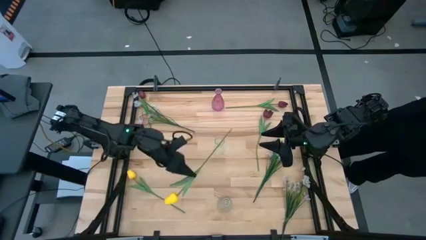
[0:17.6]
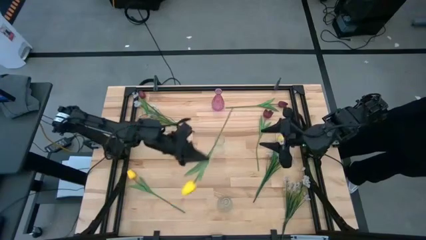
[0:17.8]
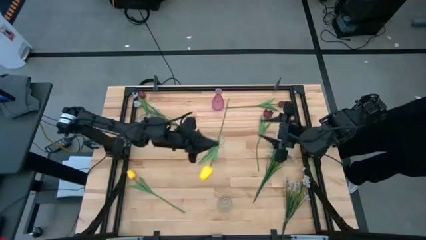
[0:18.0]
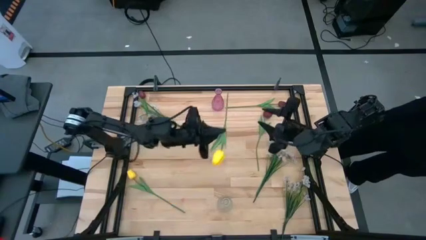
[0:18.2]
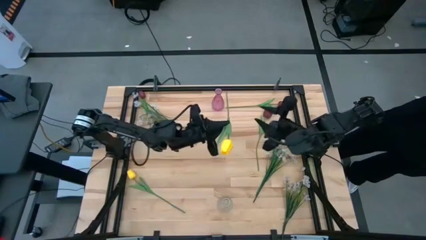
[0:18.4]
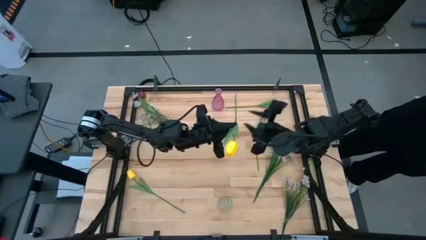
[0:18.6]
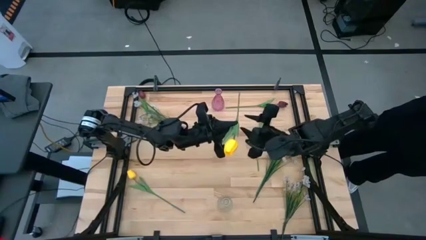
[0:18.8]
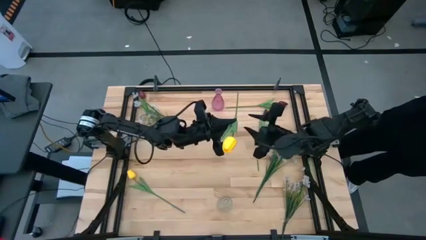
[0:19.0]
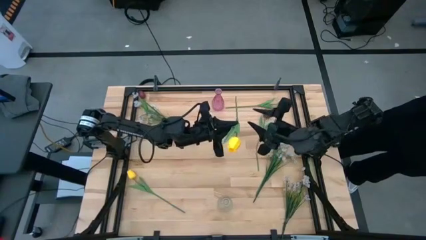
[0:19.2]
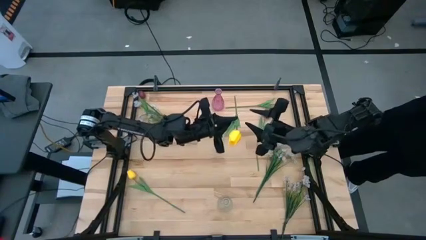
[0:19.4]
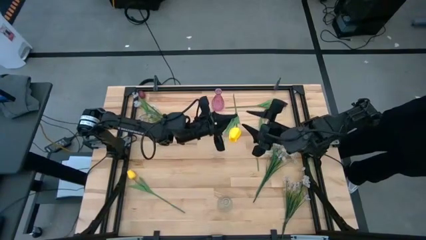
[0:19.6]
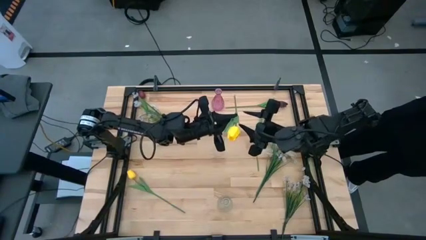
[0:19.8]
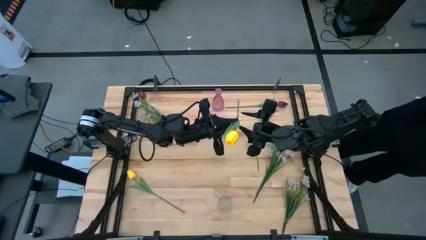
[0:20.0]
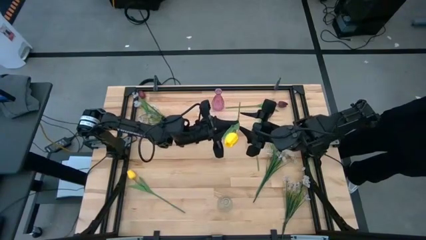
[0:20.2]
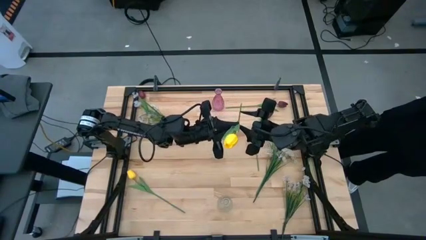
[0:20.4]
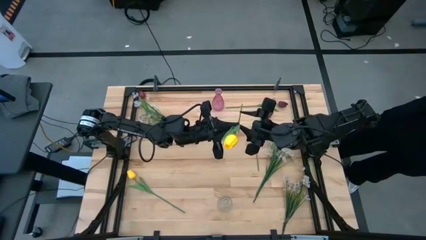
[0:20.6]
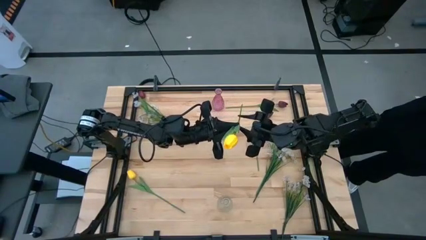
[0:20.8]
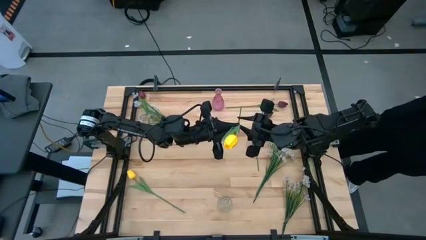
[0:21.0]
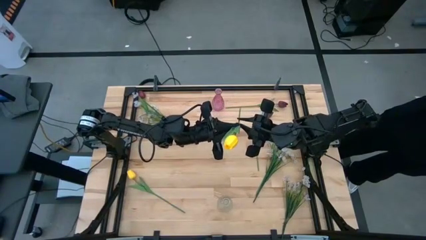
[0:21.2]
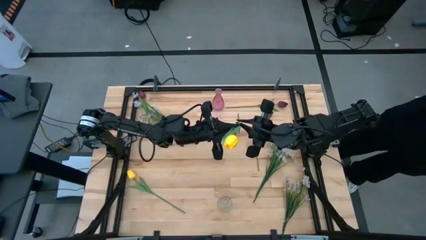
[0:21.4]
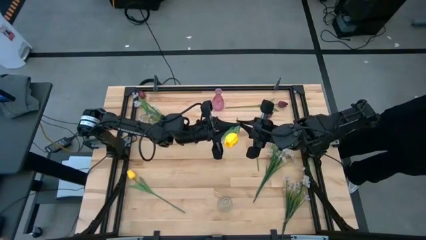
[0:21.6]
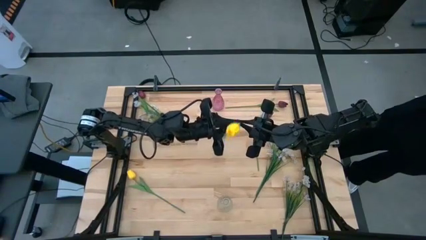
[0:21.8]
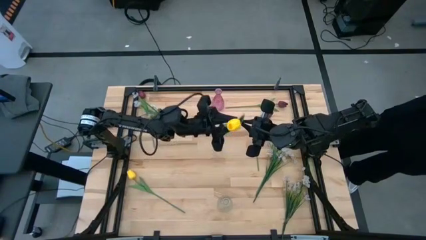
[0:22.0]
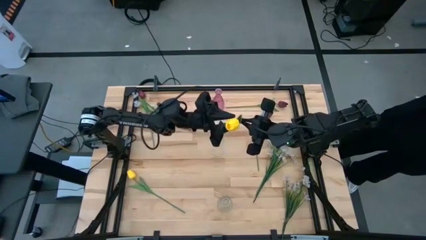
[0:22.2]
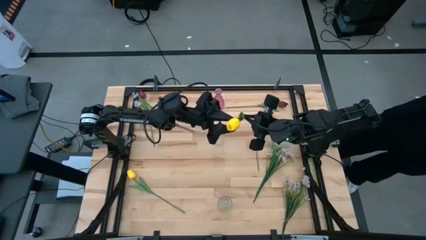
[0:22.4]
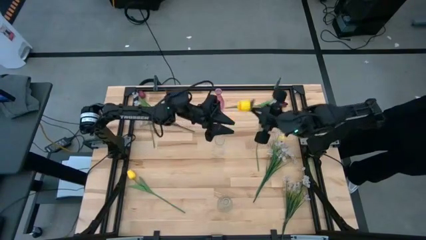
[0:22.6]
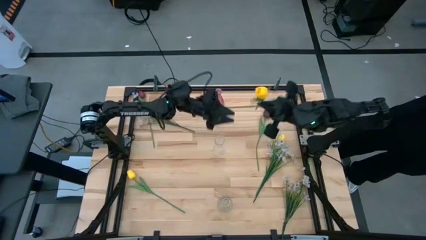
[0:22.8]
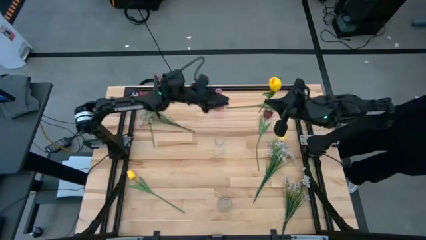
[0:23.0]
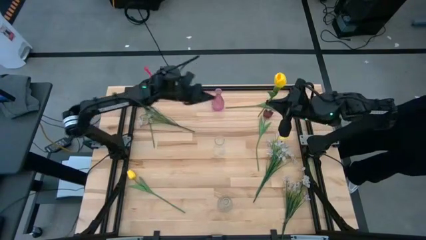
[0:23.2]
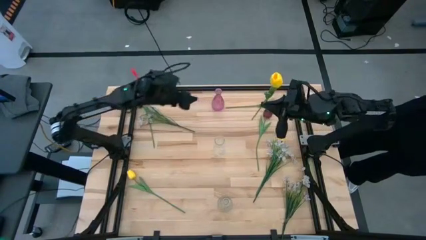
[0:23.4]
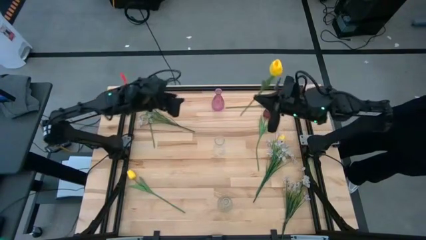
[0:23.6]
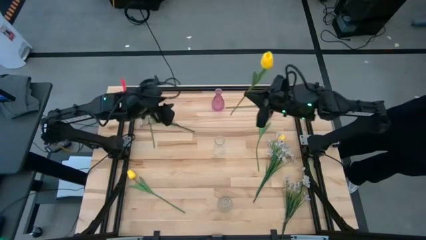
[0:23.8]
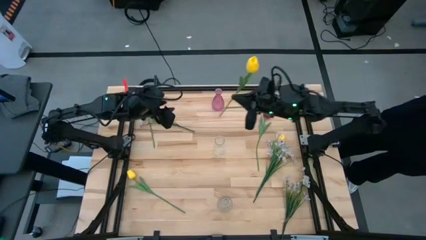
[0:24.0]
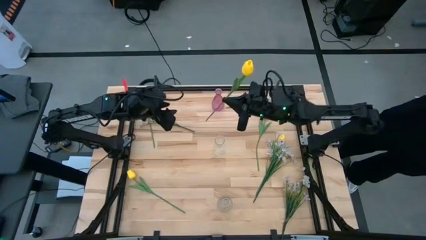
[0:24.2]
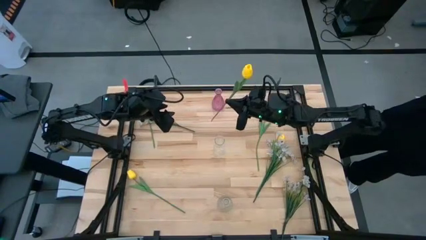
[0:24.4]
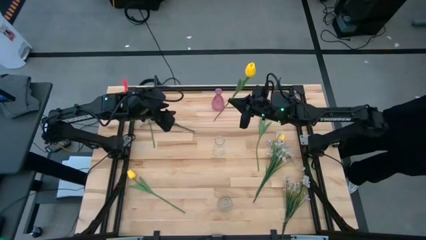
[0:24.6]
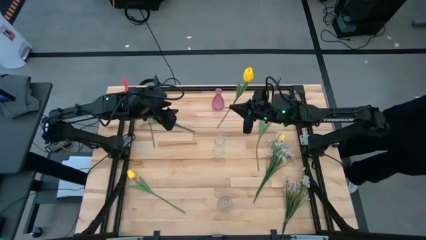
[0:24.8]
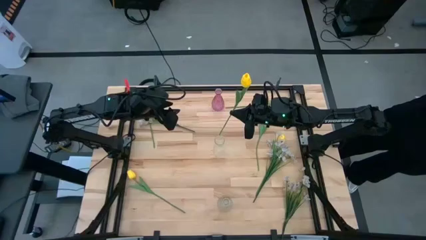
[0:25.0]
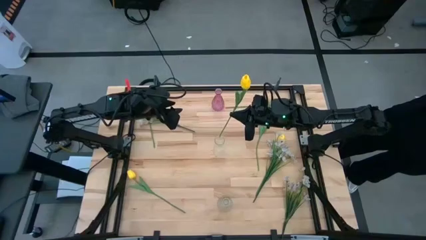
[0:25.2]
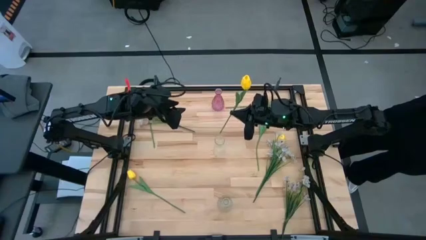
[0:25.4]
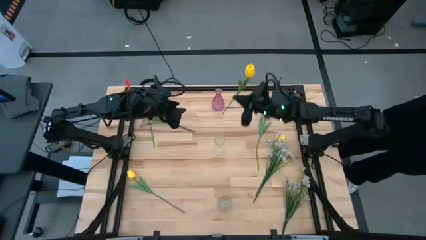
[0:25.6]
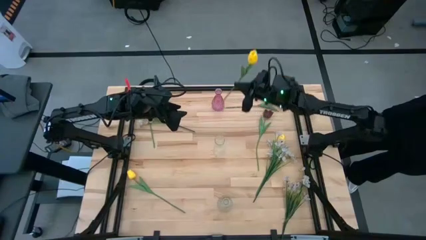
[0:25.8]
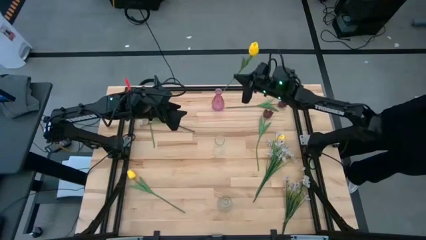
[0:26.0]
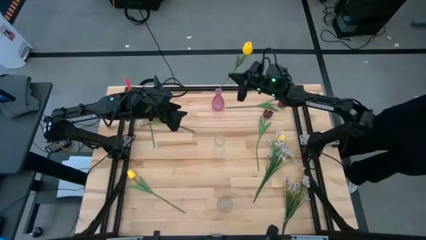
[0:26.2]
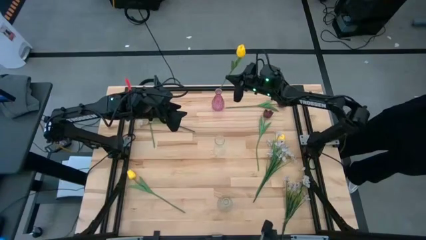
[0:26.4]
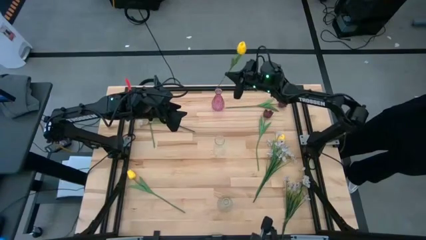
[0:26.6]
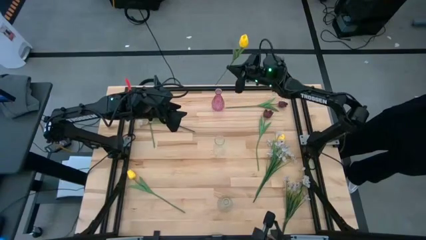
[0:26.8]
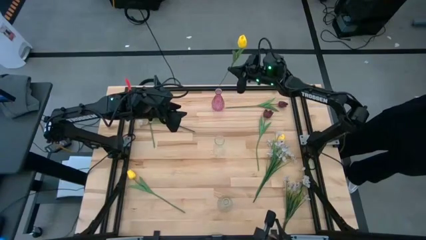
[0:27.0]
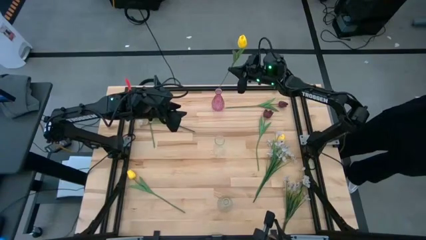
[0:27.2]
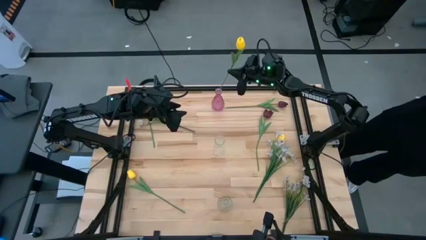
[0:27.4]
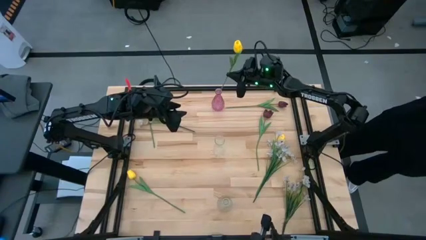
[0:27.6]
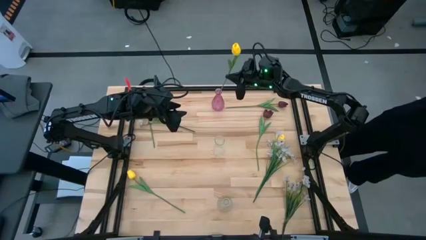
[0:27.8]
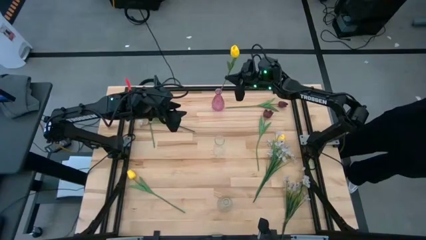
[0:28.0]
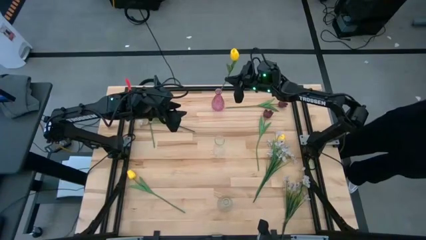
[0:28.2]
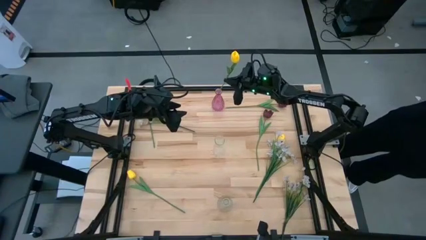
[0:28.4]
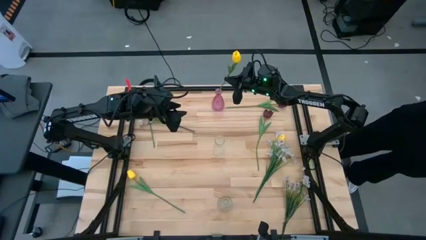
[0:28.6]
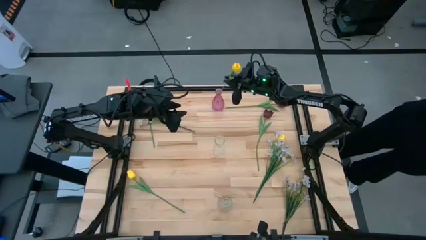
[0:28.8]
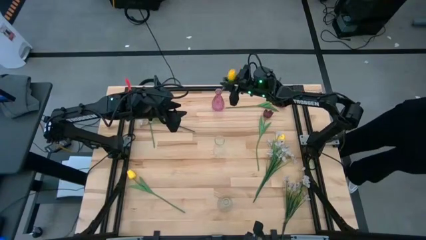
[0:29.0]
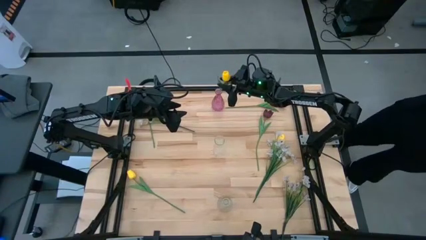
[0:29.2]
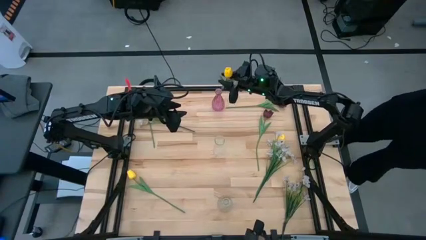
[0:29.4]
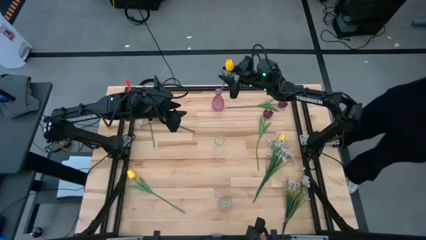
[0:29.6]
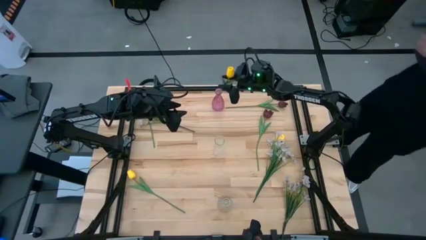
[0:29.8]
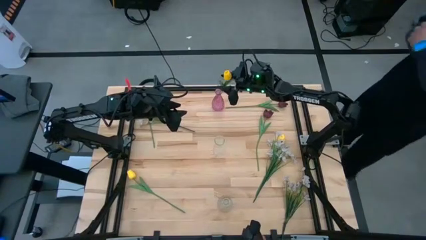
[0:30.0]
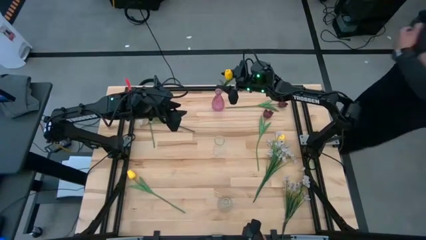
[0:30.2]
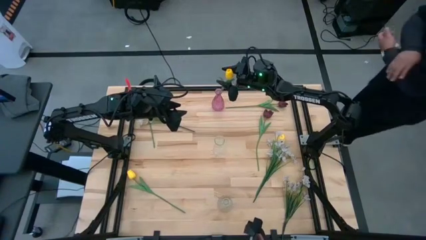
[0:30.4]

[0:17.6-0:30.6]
Task: Sort flowers into vase by color
Put the bottom yellow flower into the pink transparent vase

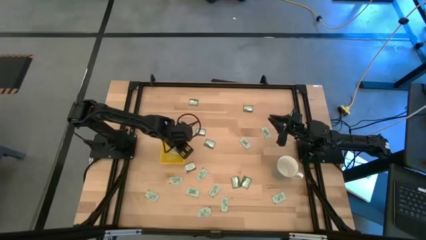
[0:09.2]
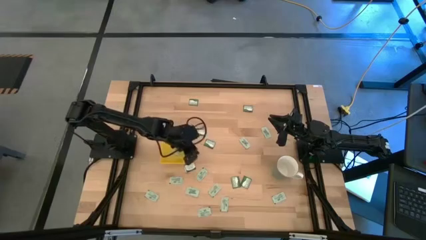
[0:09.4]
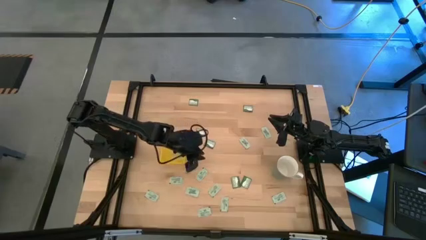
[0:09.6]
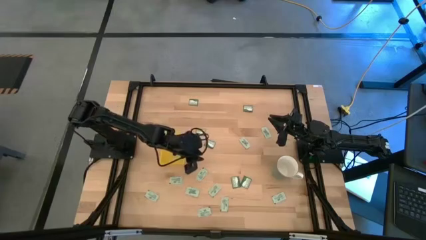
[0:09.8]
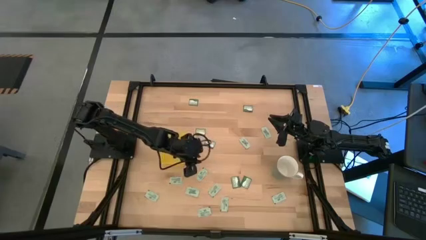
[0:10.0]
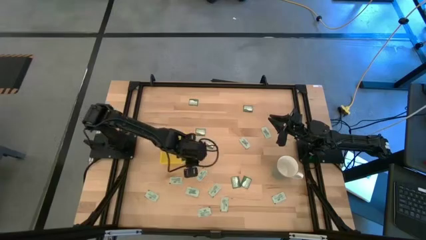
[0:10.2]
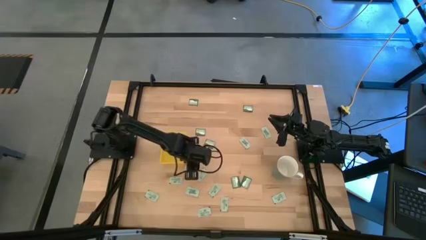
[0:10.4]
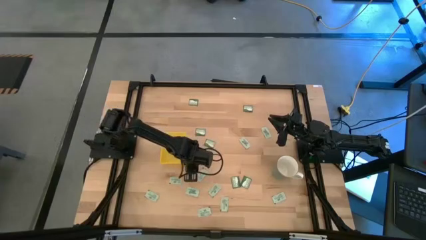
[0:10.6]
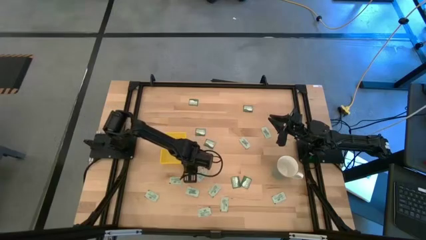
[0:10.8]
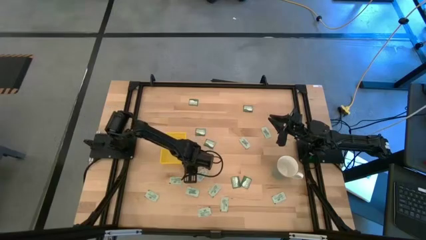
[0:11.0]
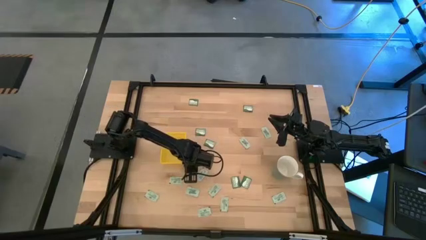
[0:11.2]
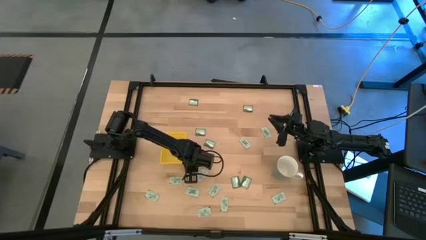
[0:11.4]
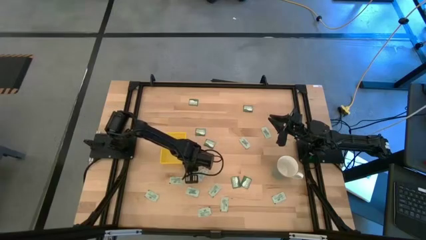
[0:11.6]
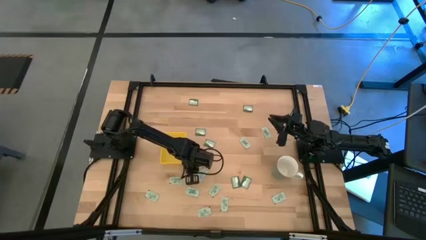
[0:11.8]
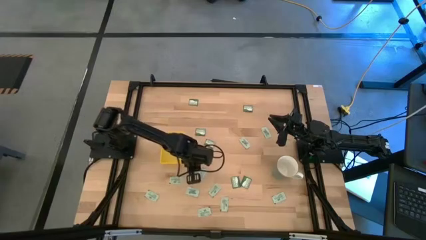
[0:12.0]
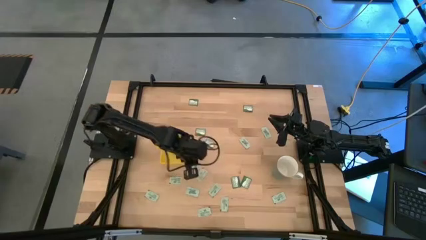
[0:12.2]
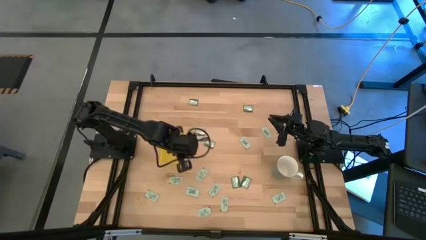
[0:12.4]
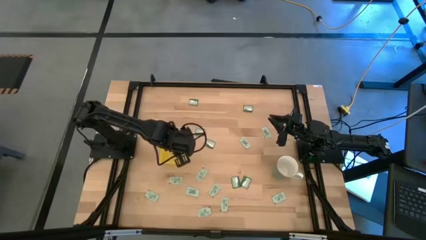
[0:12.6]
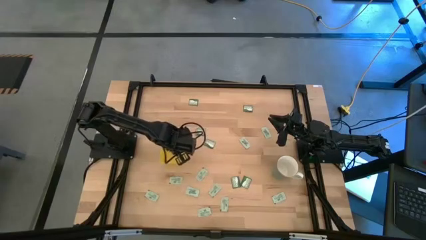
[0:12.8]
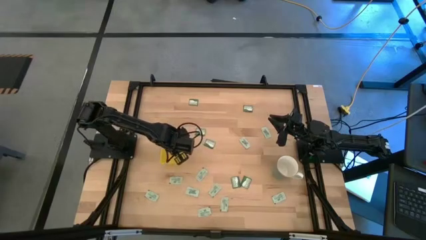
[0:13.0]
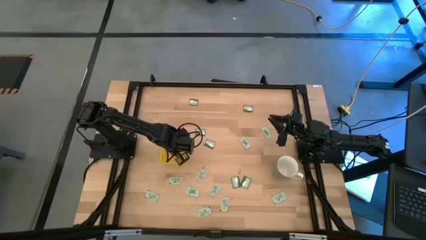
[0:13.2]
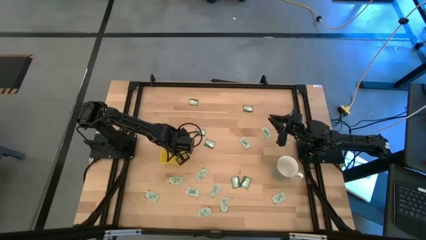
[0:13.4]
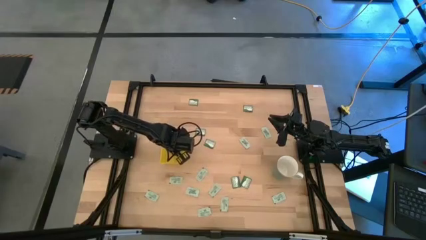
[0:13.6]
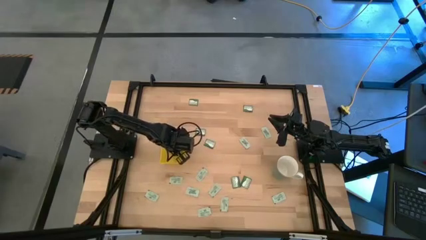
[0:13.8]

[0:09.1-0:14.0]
Task: Pick and place Stevia / Truvia into bins
Put the green packet into the yellow bin
